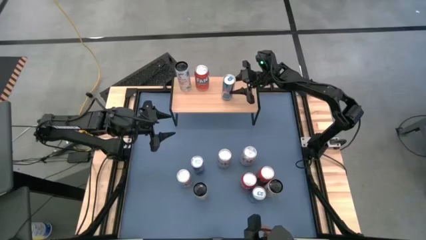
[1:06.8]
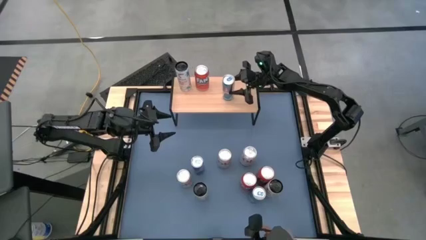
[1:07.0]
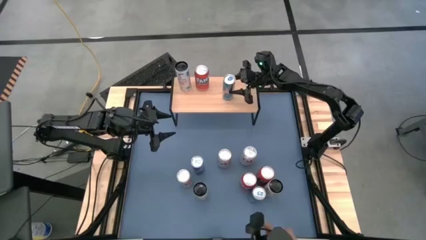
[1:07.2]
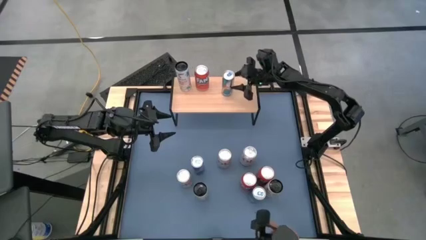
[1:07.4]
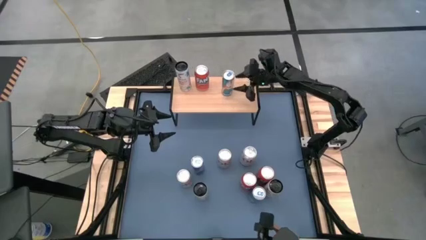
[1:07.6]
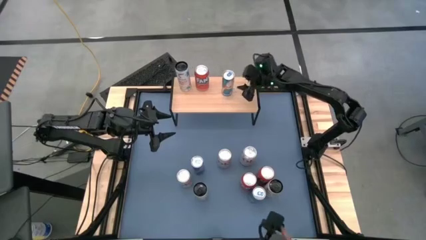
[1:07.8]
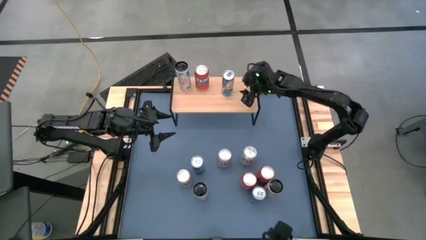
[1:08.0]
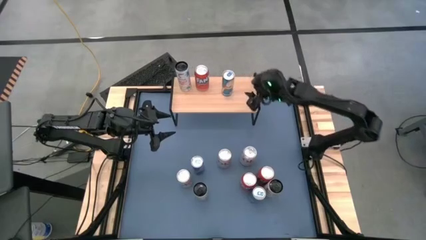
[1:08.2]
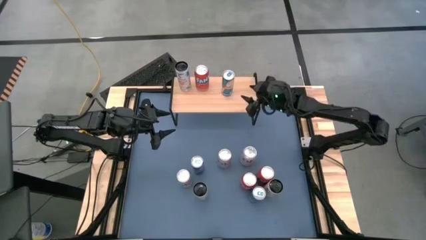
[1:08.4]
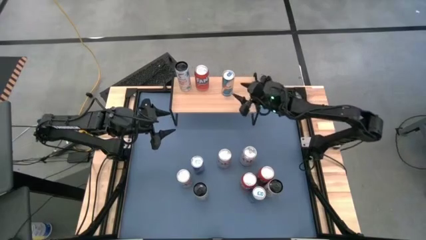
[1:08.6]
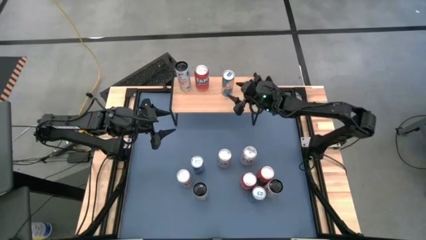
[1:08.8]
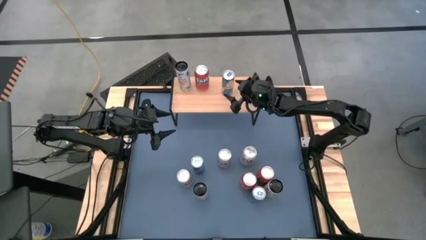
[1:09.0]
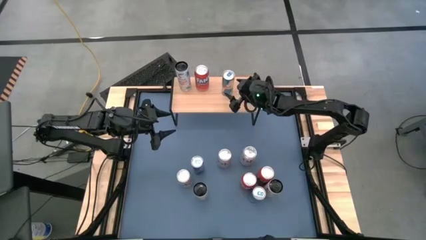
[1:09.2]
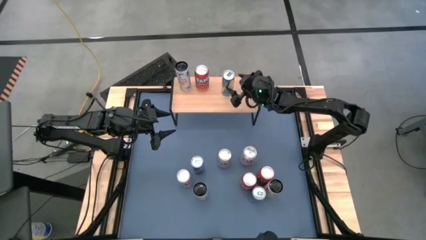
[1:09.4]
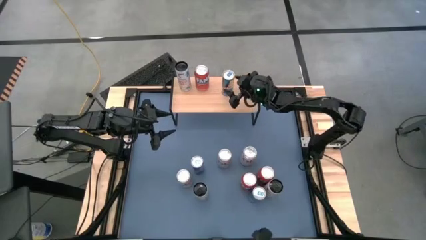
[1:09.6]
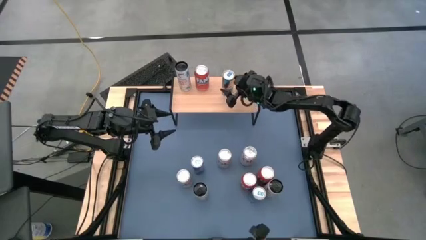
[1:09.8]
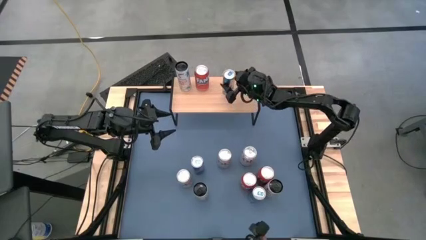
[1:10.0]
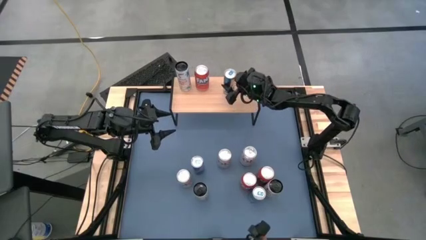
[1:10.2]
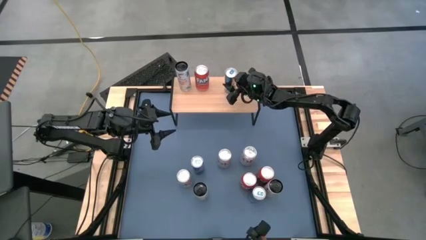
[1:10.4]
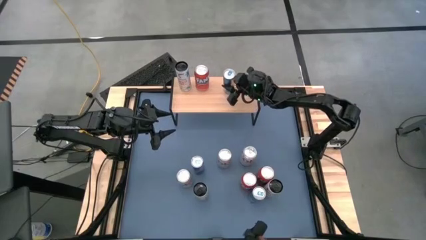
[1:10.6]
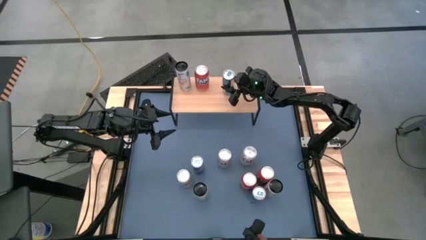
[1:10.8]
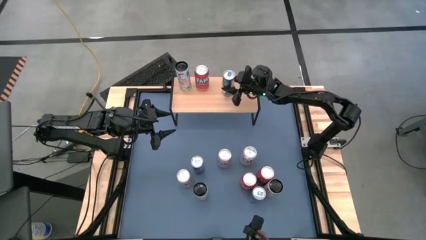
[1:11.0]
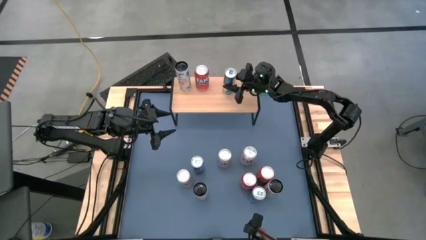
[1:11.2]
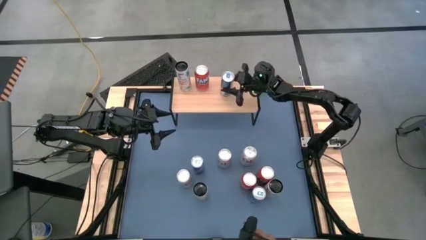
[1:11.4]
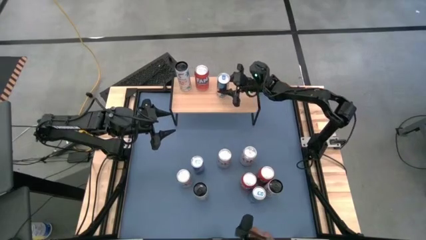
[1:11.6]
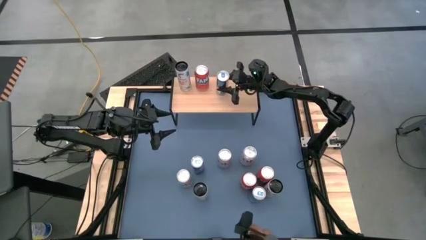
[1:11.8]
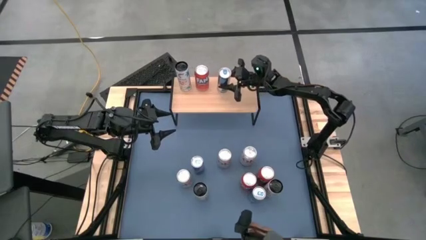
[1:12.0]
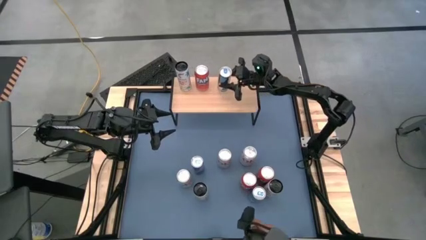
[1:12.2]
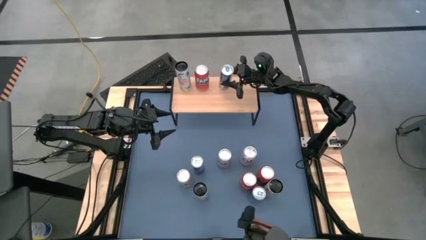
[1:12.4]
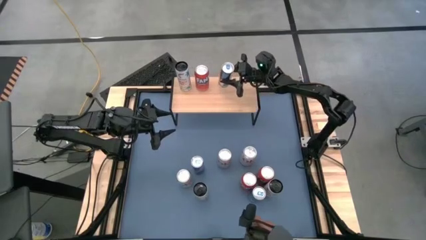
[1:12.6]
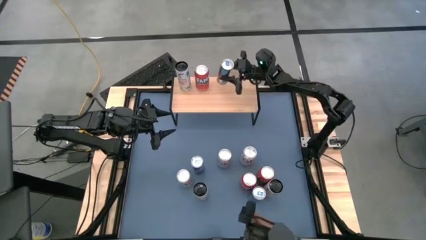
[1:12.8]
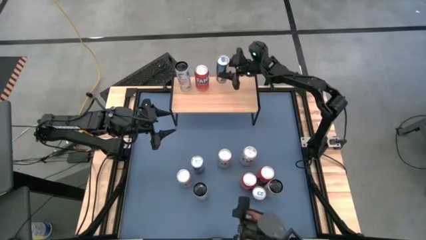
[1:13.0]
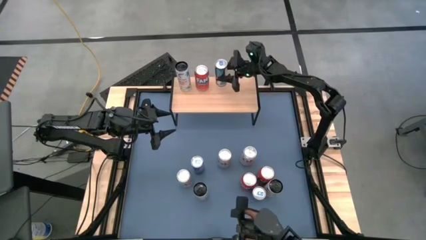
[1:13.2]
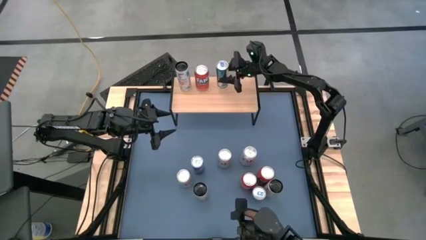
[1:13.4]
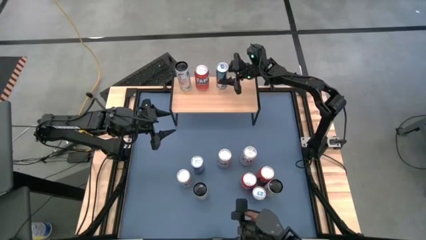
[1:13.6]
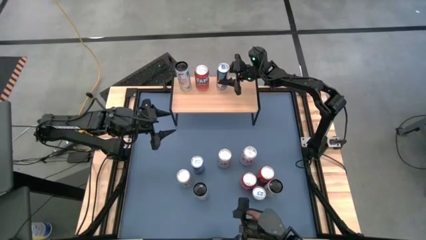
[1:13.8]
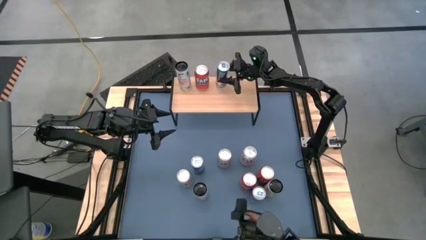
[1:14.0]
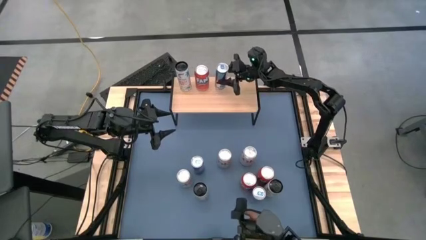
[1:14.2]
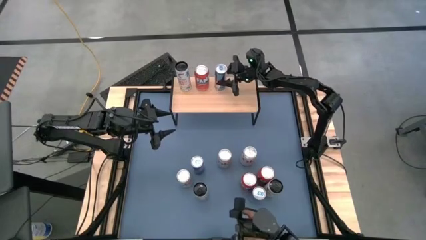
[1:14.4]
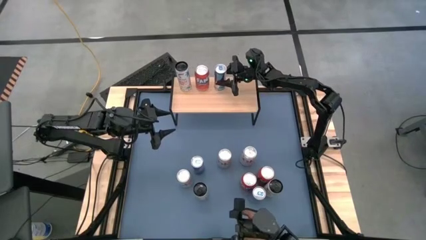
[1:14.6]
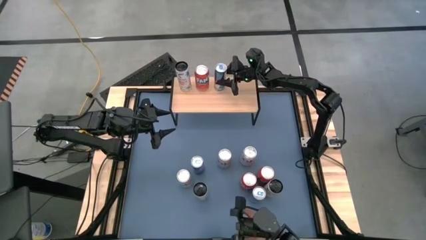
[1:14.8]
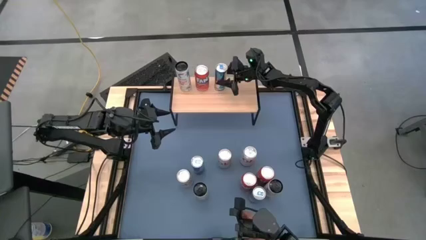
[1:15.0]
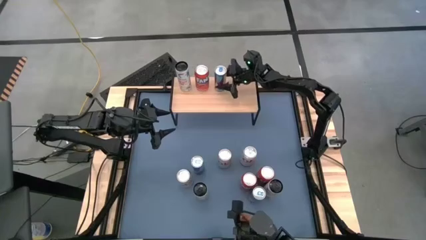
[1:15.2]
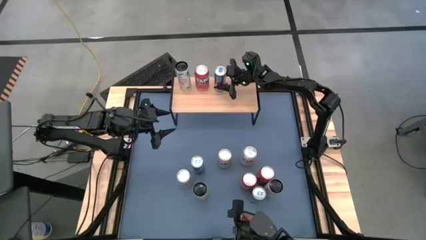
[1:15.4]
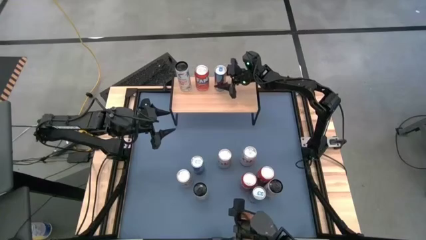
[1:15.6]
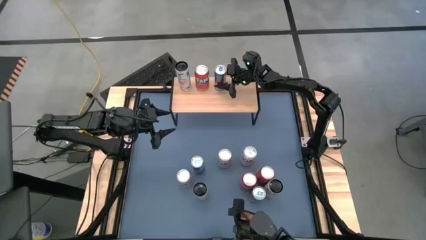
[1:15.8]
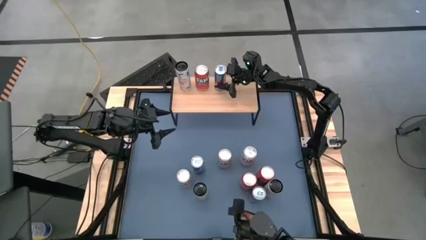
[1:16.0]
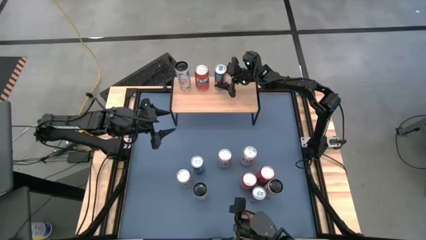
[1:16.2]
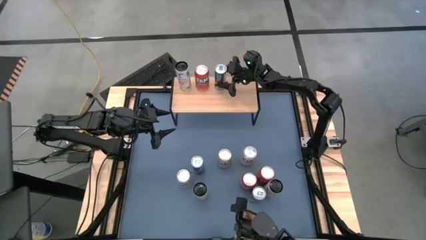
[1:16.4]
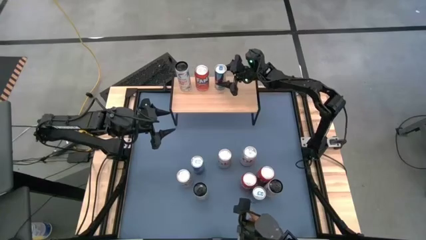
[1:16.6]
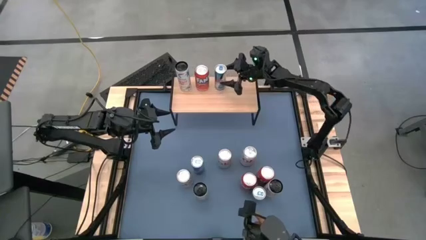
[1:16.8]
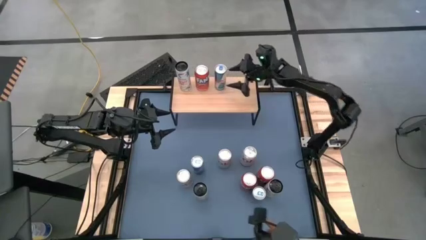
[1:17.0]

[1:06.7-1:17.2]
Task: Place canned beverage on shelf
Adjust the blue soda can

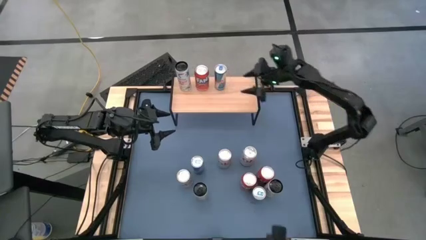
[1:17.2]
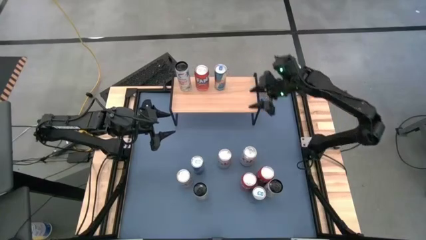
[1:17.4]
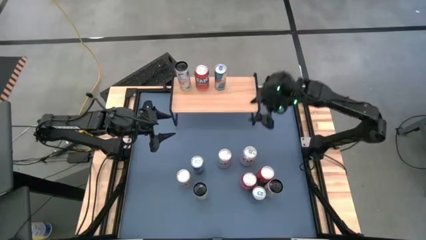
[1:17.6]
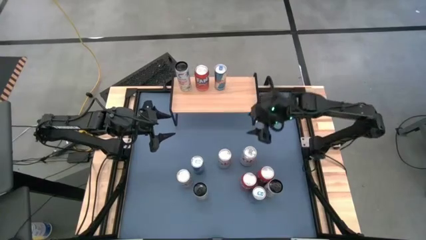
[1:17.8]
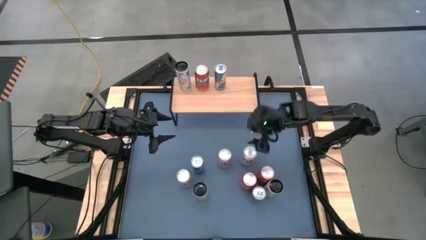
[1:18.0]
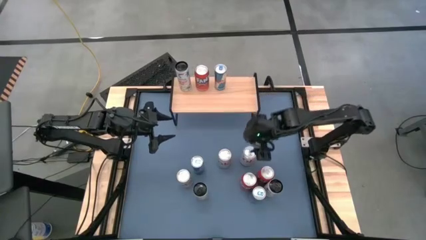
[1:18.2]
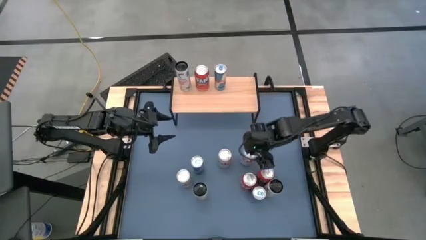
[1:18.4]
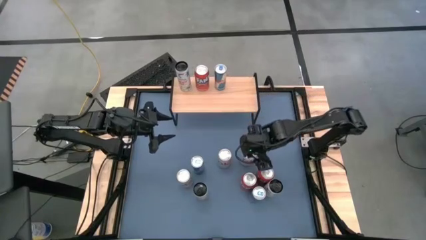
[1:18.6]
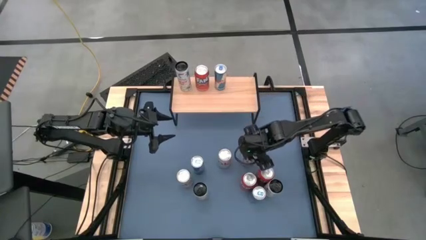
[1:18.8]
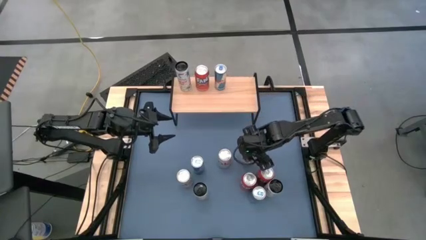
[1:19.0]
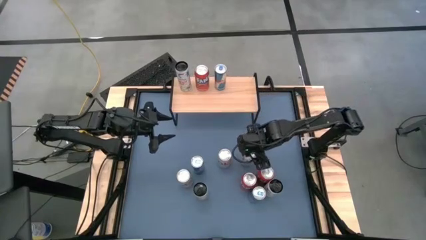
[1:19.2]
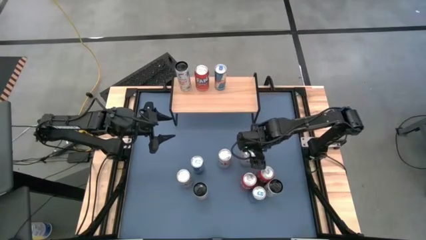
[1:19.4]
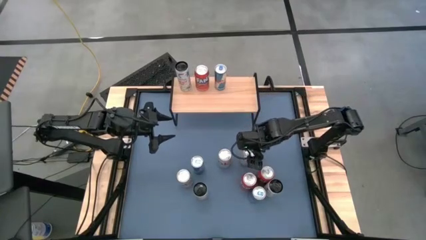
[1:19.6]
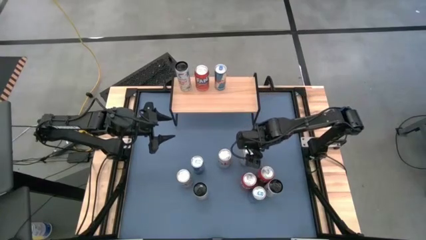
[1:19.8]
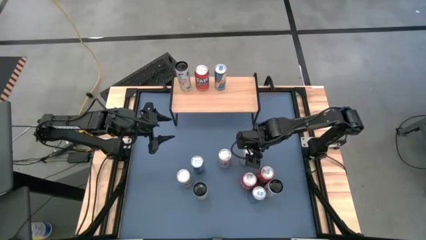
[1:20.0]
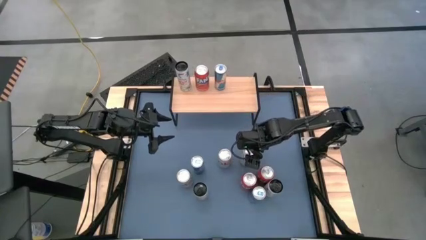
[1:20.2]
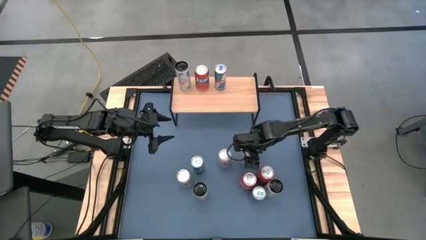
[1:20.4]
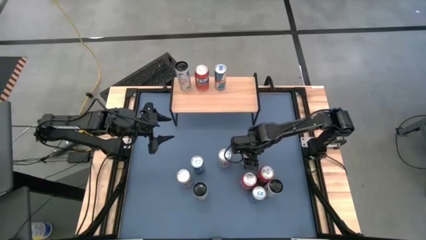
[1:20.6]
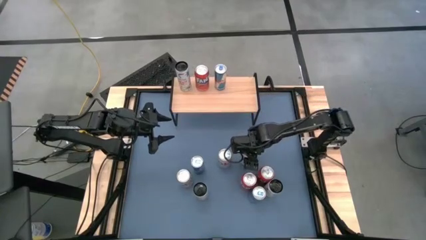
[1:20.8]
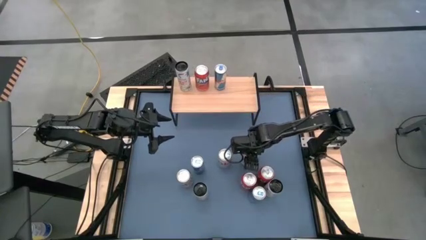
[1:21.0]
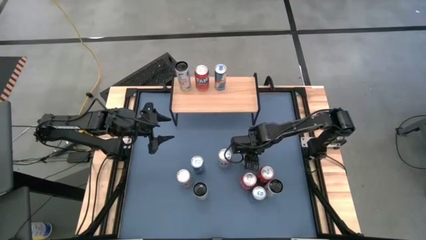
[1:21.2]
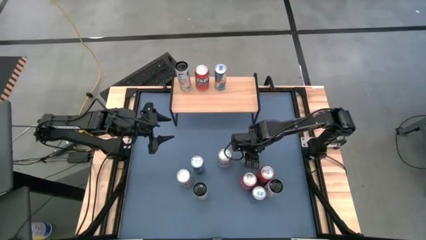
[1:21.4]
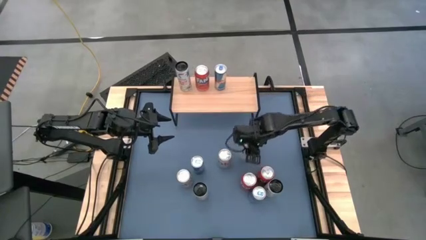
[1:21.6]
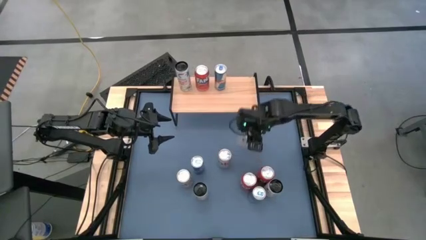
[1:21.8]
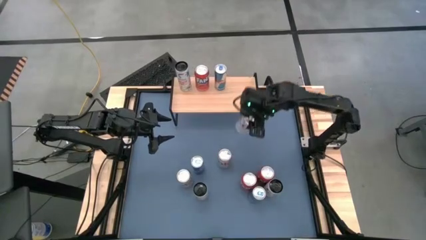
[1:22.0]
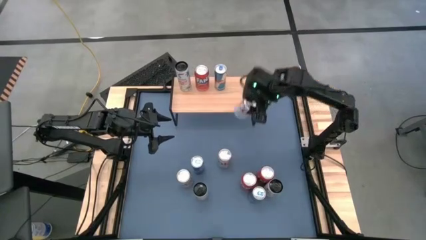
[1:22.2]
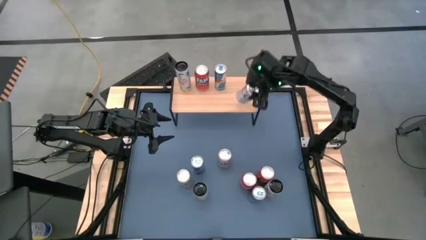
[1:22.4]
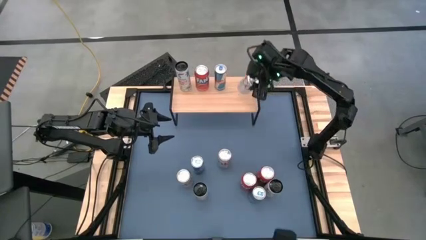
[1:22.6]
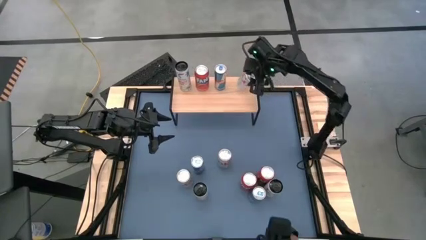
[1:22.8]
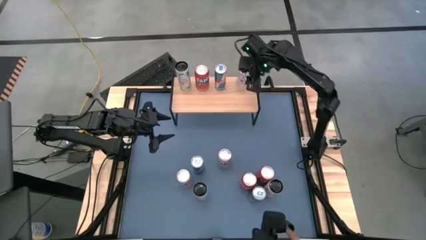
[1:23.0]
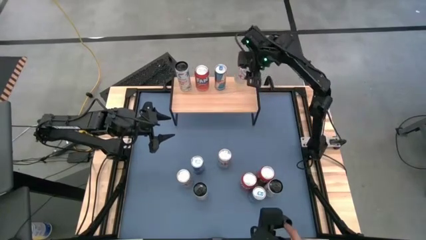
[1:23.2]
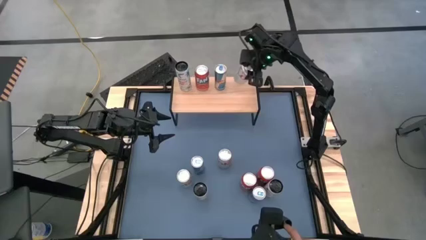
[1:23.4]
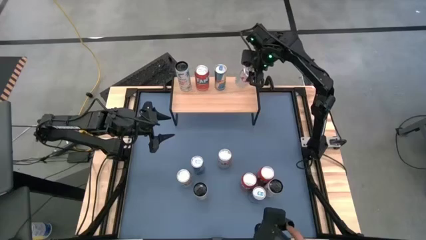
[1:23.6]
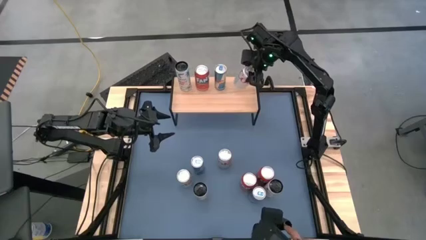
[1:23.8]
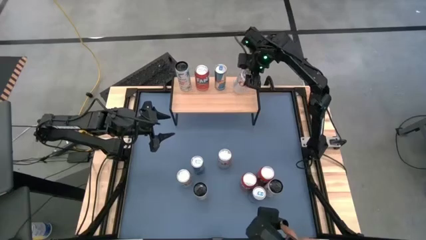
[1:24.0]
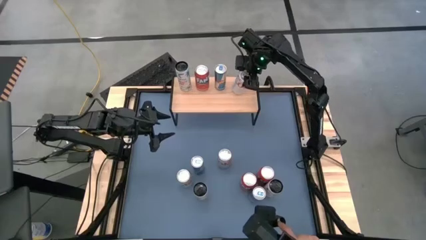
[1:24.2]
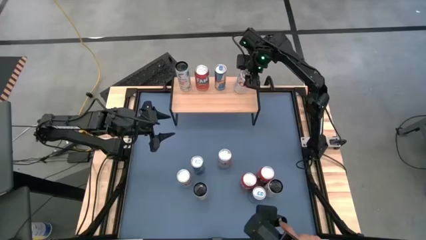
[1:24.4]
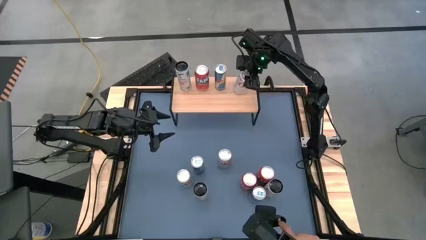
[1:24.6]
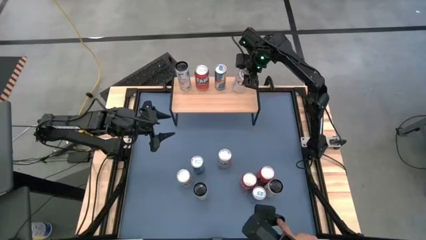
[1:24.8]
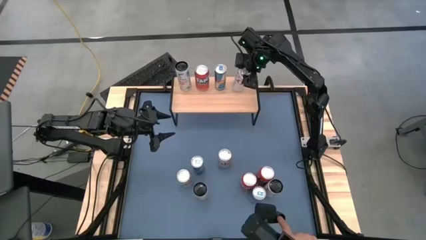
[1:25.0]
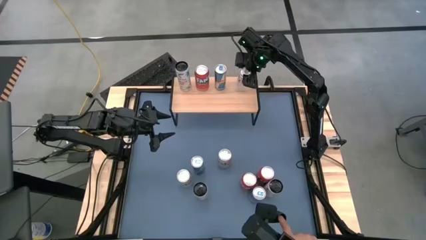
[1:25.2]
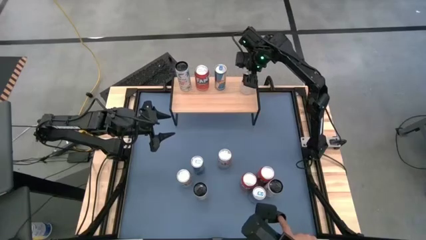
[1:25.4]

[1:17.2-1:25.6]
Put the middle right white soda can on the shelf
